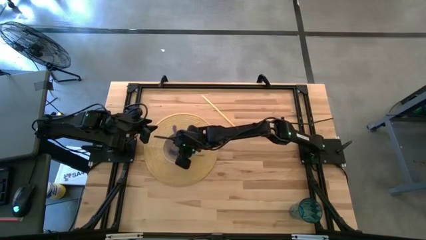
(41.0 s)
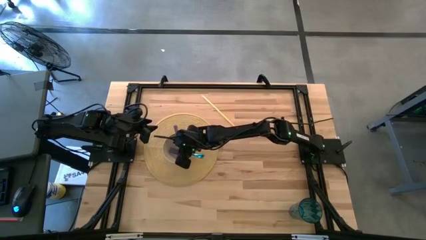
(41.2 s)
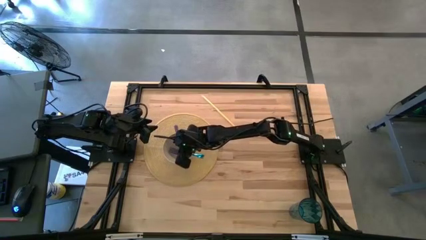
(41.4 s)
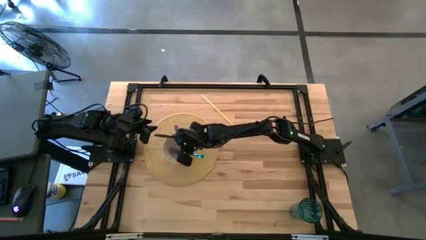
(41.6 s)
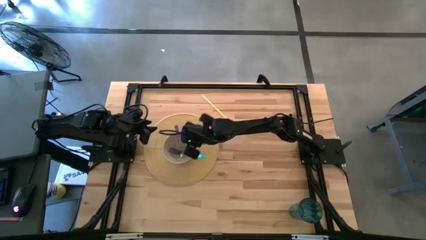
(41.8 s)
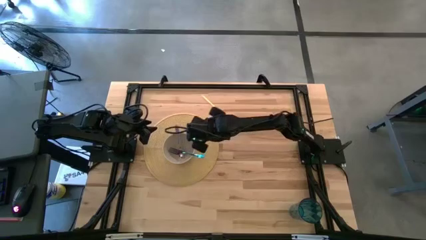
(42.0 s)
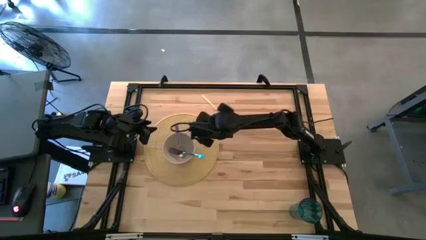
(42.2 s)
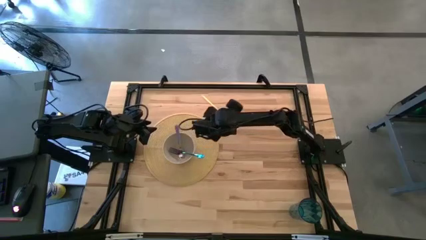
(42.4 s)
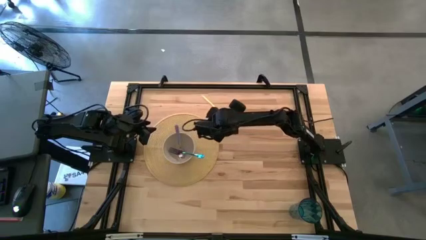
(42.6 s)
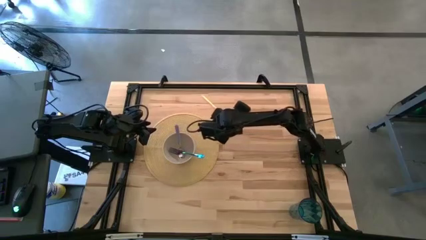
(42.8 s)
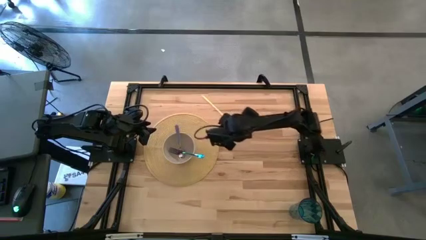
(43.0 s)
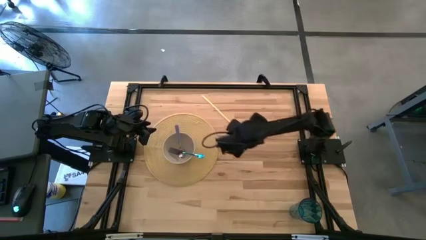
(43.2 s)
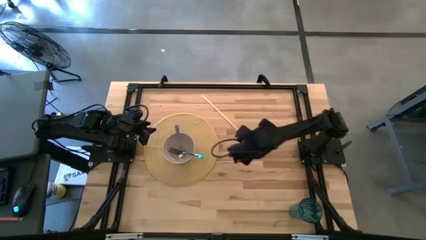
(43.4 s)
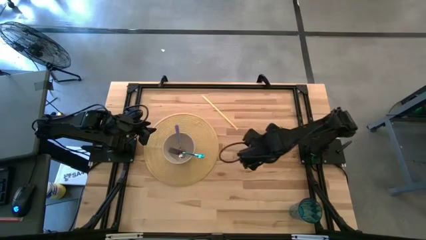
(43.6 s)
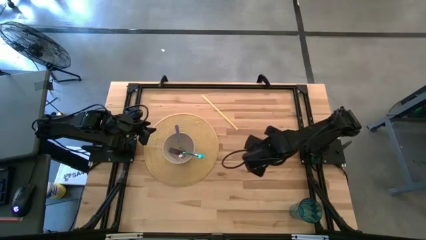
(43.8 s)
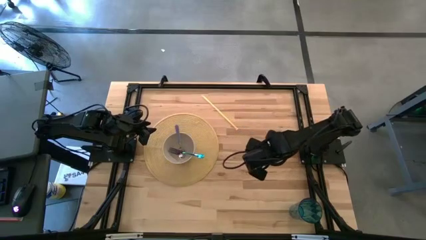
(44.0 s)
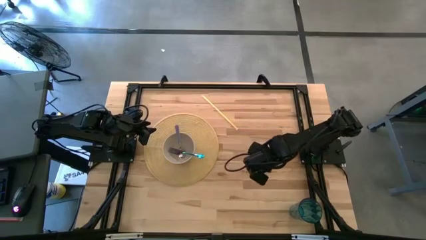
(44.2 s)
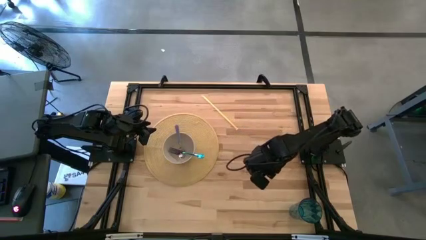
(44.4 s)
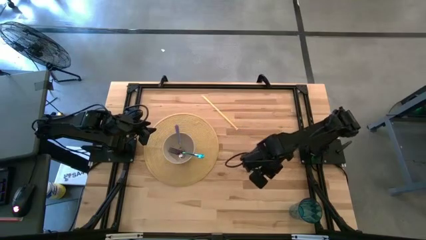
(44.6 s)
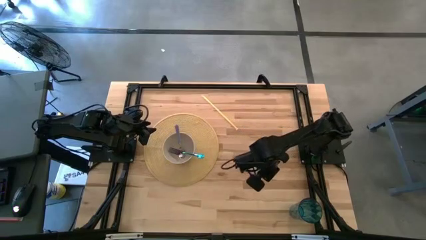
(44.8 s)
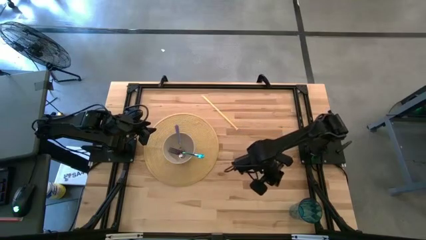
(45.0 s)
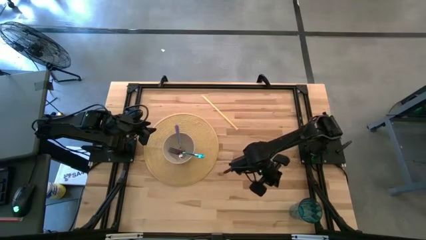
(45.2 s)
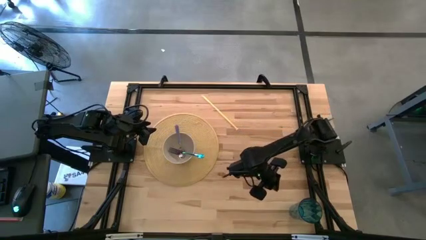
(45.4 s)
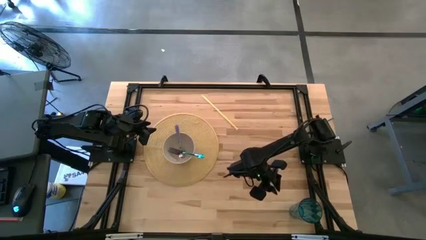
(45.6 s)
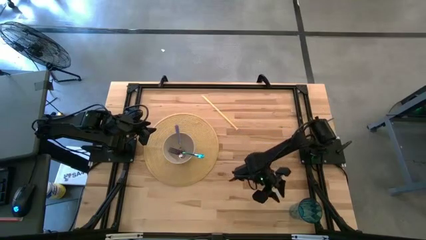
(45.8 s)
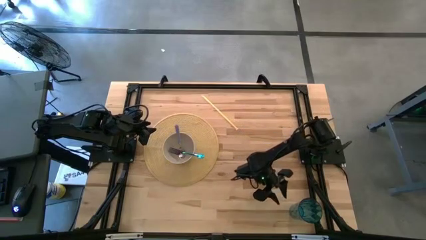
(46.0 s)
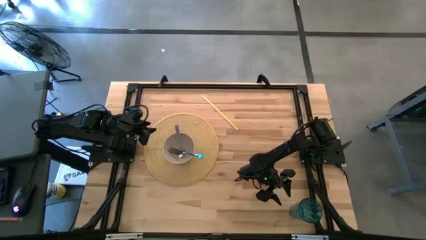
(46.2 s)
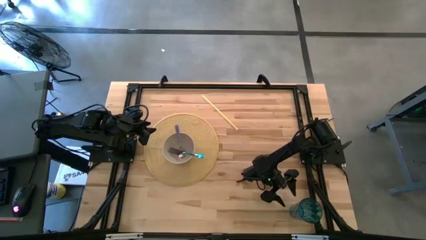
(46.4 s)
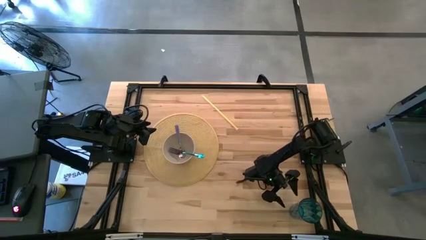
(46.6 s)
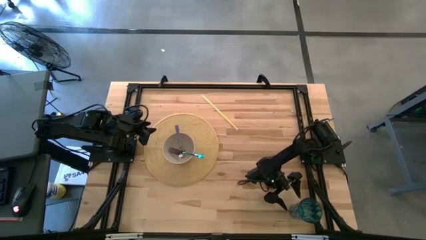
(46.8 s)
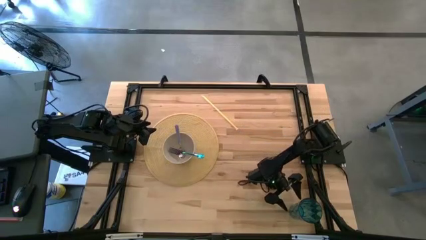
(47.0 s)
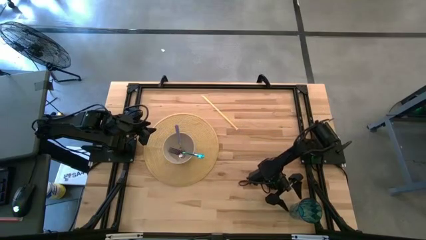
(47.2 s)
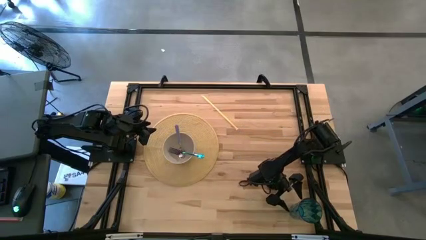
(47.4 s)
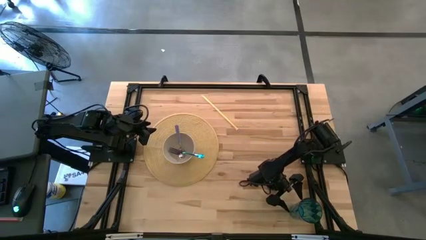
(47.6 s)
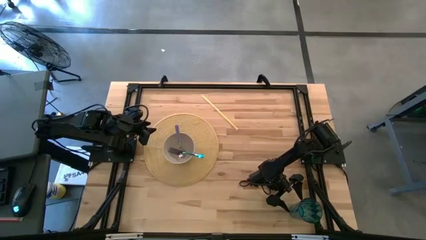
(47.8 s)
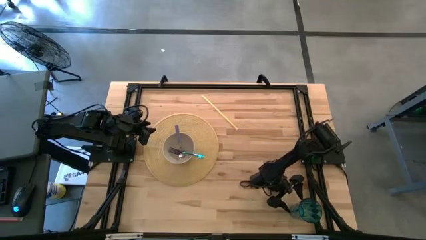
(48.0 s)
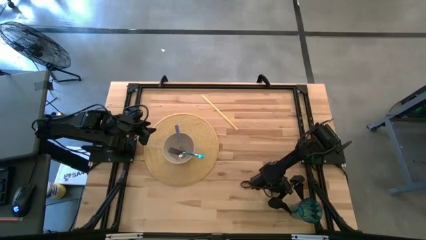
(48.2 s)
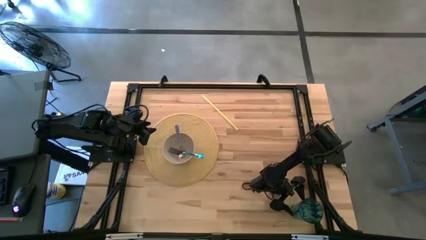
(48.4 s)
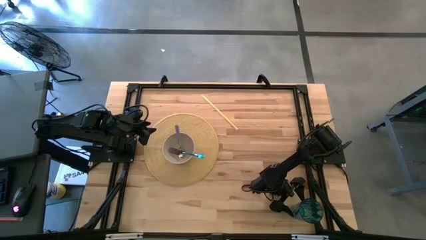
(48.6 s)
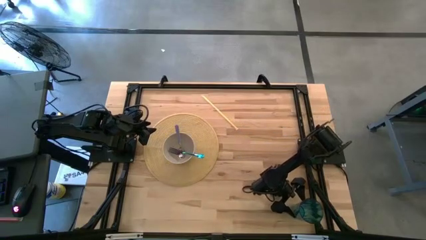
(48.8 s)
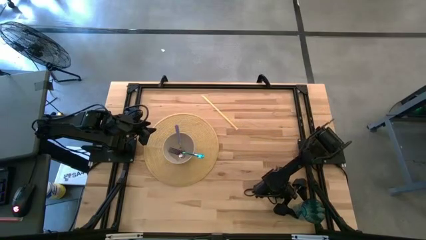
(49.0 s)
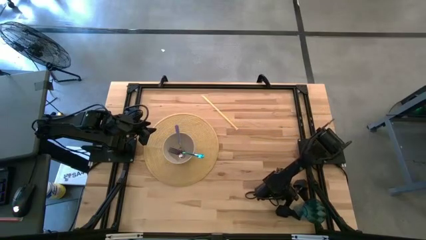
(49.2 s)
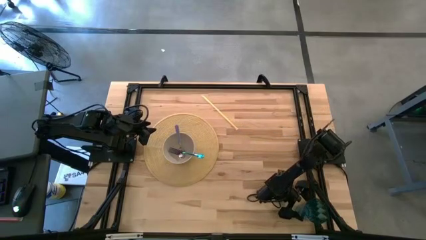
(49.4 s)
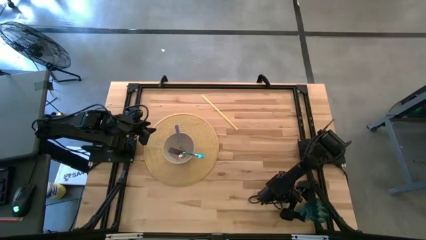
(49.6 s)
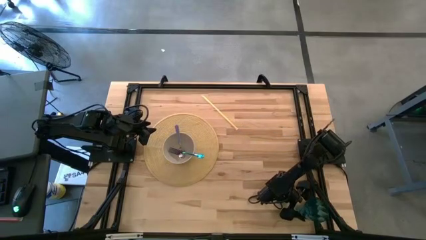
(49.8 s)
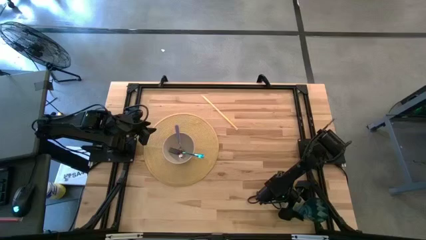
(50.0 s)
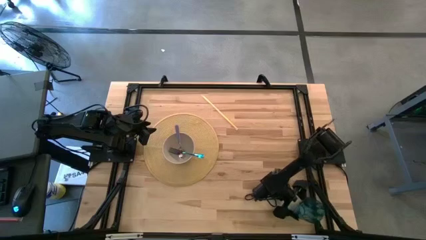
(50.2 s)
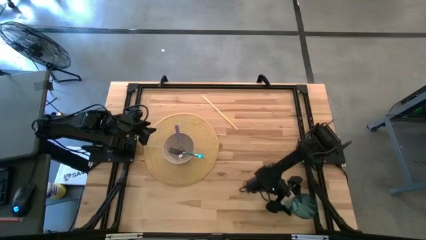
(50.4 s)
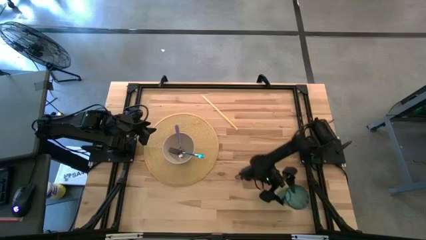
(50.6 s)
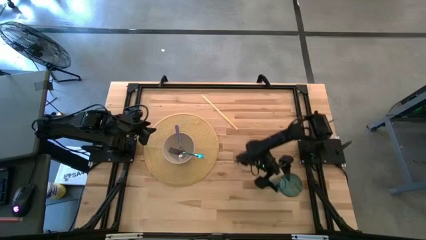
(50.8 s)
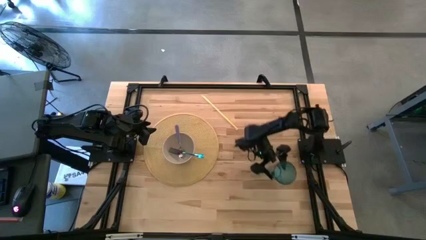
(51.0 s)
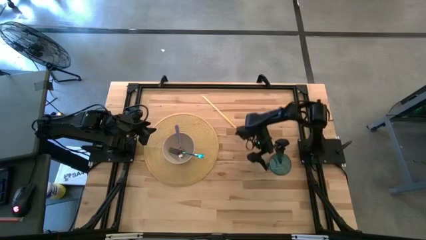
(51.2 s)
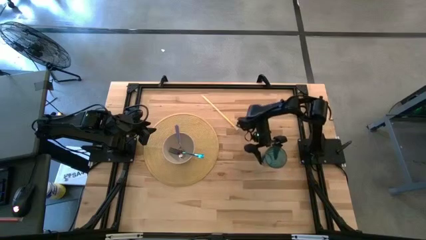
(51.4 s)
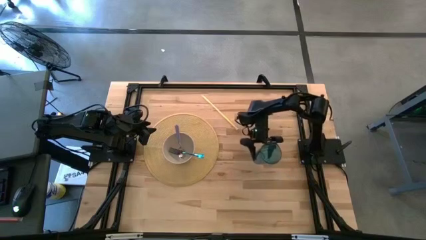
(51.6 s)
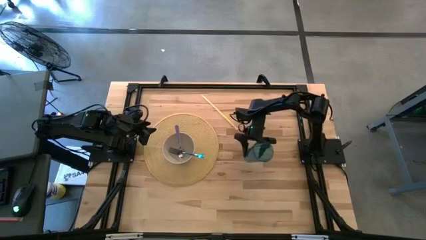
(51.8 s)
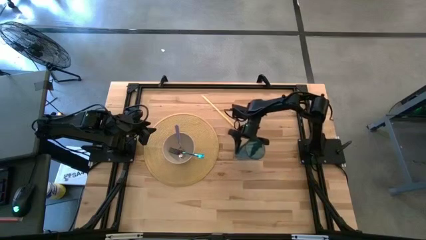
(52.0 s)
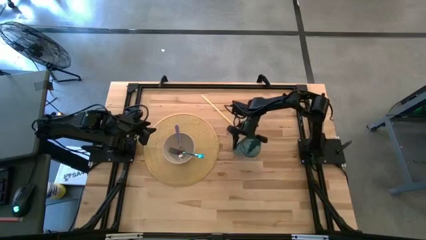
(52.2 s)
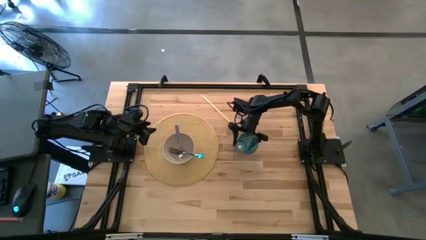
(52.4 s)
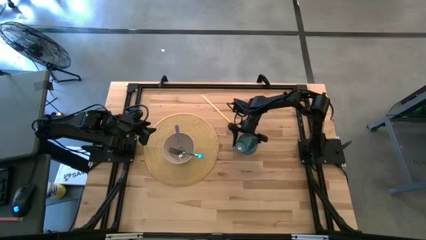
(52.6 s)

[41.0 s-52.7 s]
Task: Pick & Place Utensil
Put the blue cup on the yellow mat to the top right of the white bowl

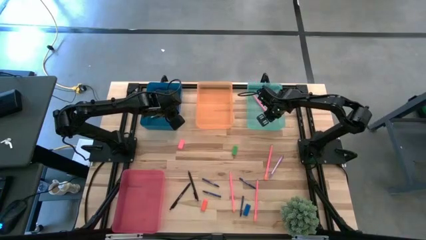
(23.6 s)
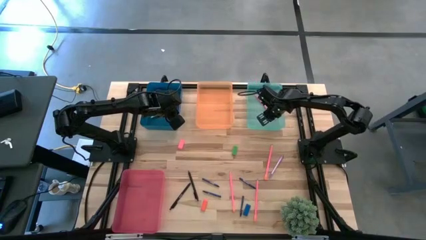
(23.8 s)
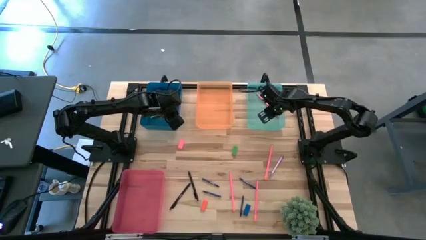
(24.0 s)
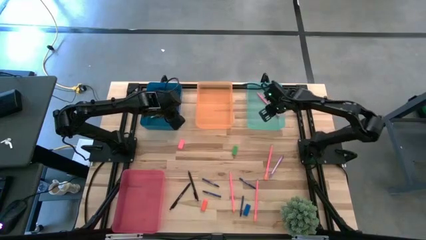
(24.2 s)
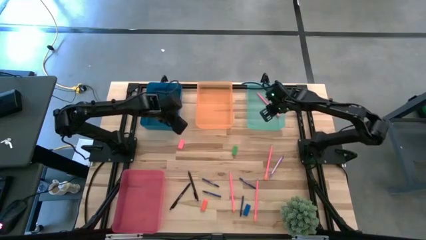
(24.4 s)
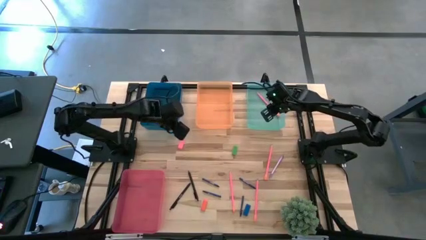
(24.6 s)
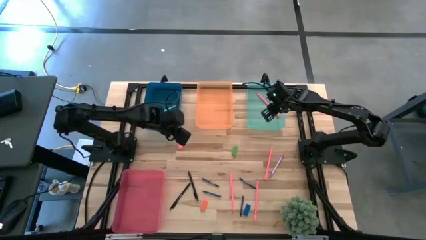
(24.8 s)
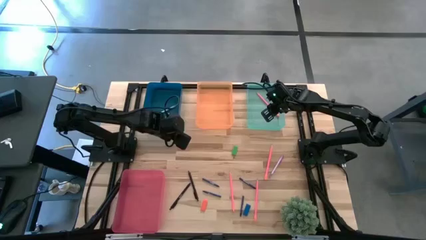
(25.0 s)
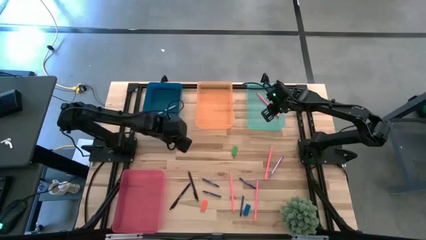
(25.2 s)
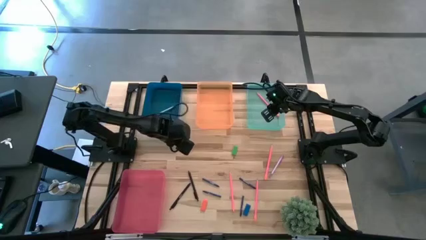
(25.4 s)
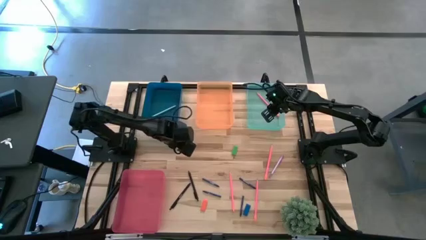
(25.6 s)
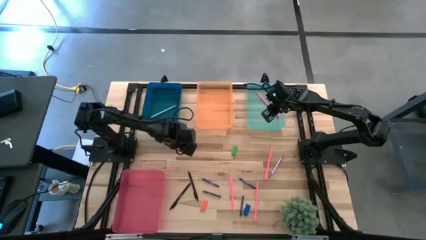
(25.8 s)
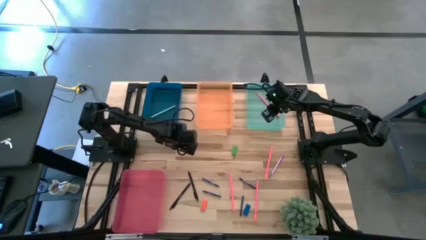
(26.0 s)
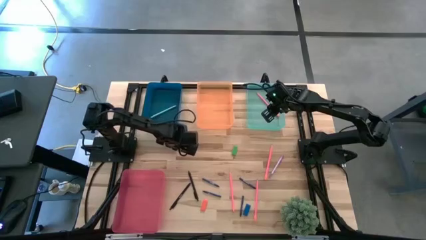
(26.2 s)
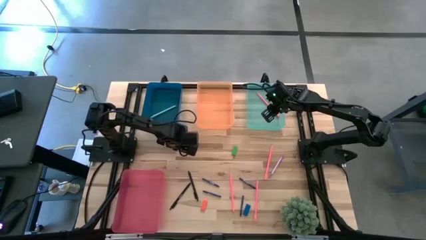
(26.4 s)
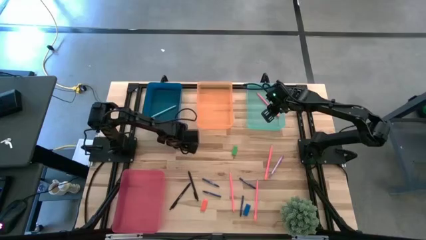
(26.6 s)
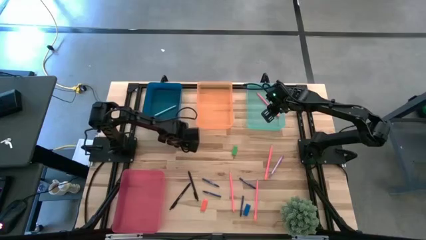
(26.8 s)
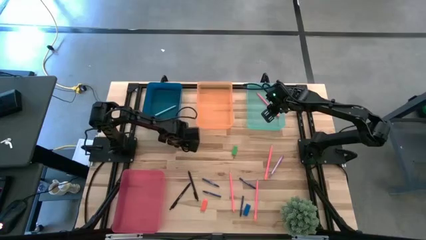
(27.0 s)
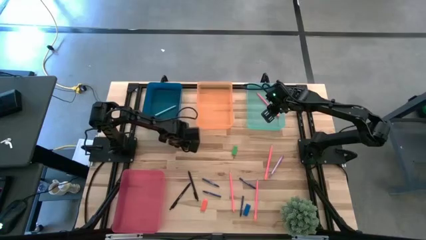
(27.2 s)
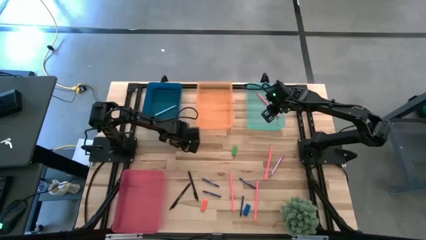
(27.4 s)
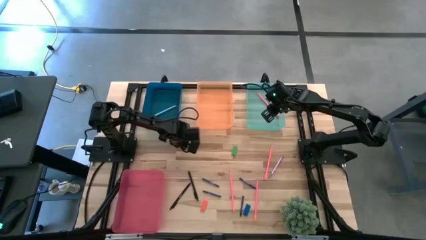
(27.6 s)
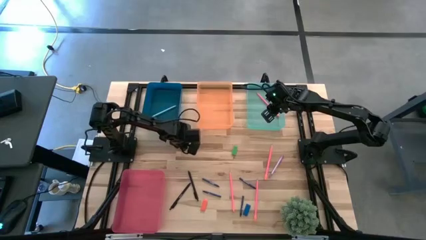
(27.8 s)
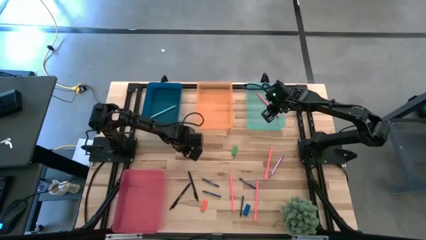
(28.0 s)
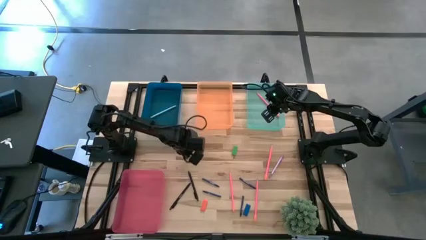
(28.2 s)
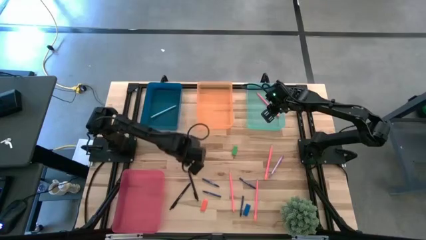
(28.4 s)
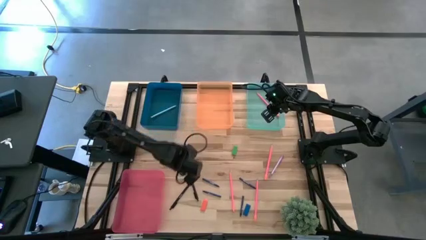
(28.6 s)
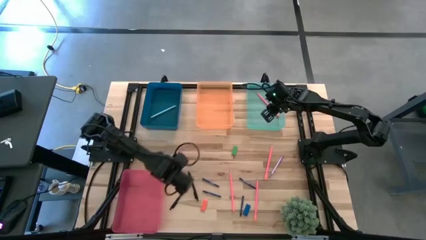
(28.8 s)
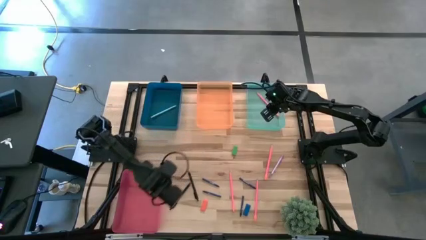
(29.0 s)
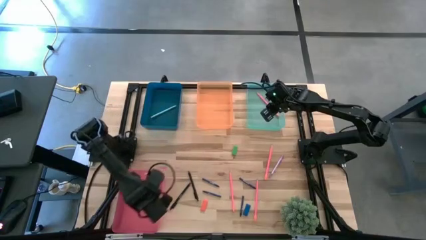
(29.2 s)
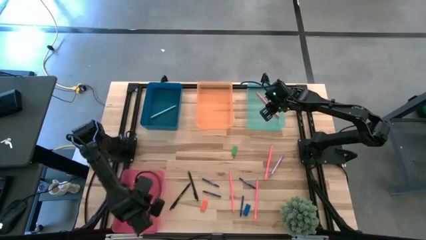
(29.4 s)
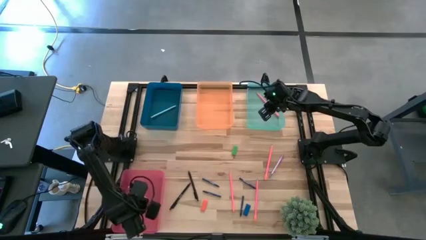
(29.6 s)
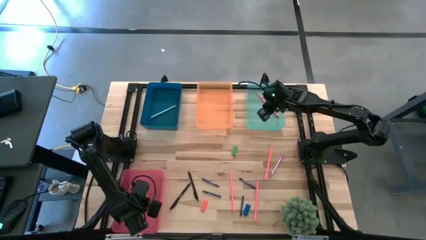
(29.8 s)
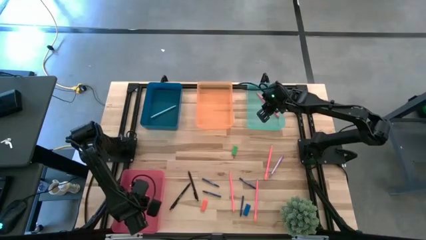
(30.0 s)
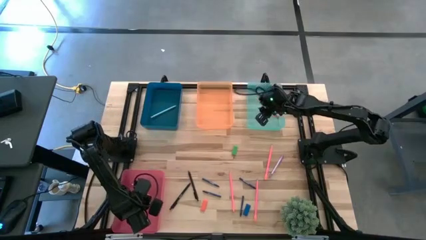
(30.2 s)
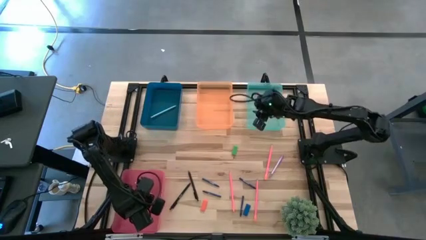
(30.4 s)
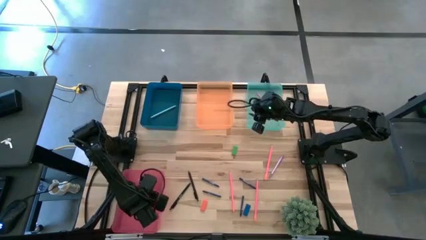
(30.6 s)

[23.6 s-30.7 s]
Task: Sort crayons/erasers/pens/pencils in bins
Put the pink eraser into the pink bin
